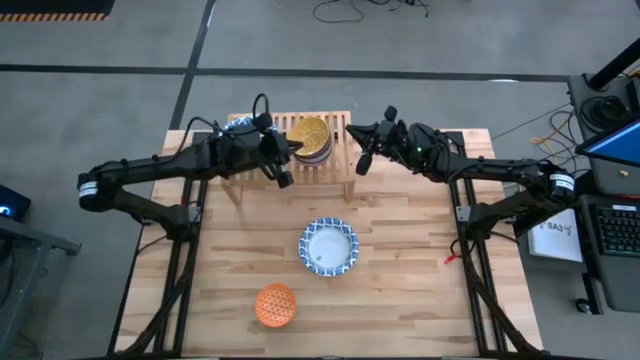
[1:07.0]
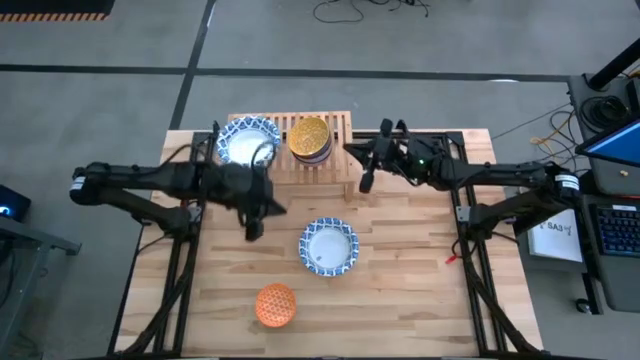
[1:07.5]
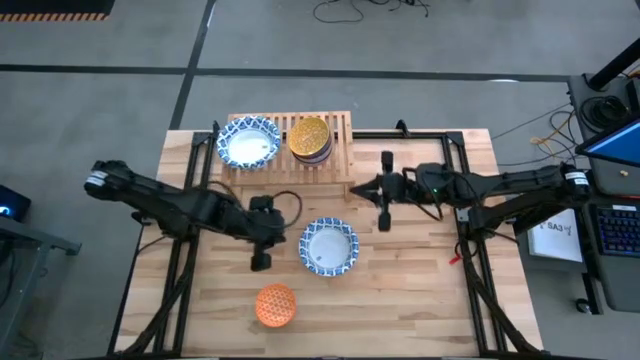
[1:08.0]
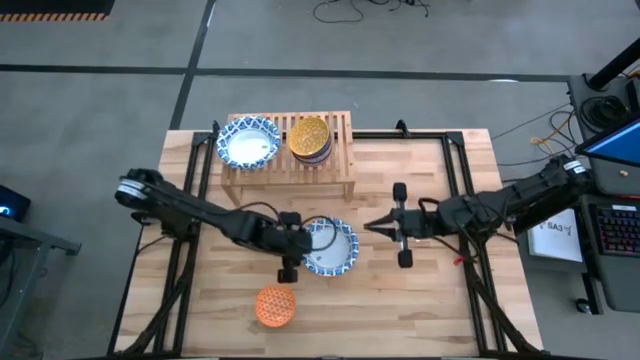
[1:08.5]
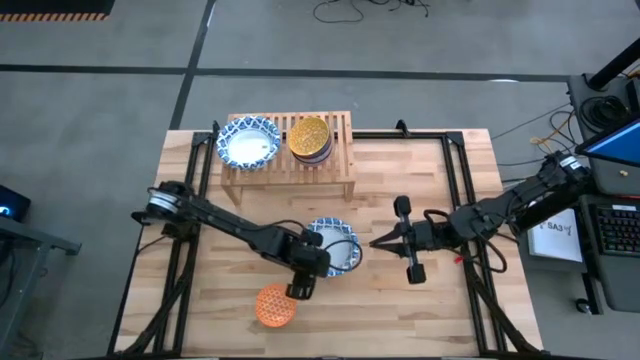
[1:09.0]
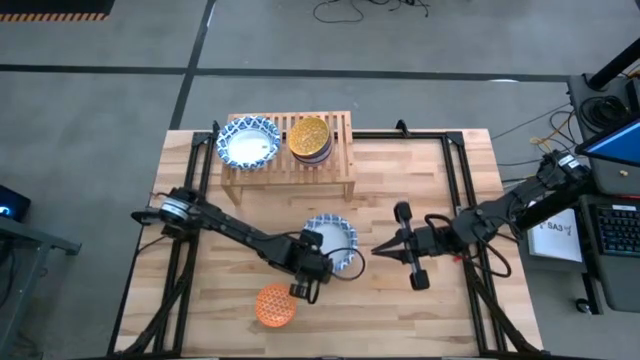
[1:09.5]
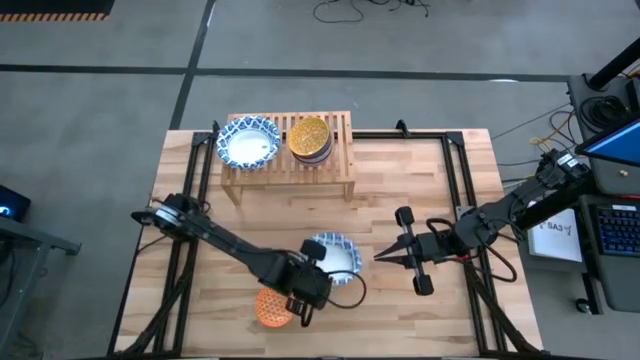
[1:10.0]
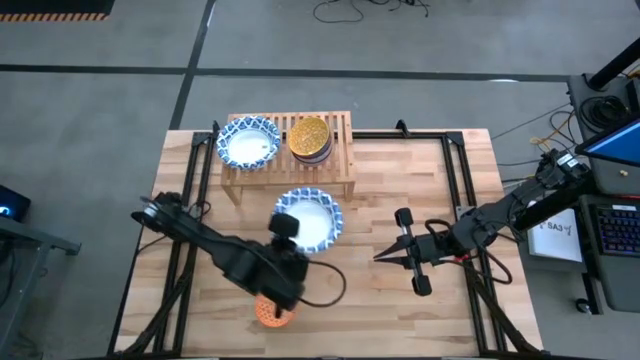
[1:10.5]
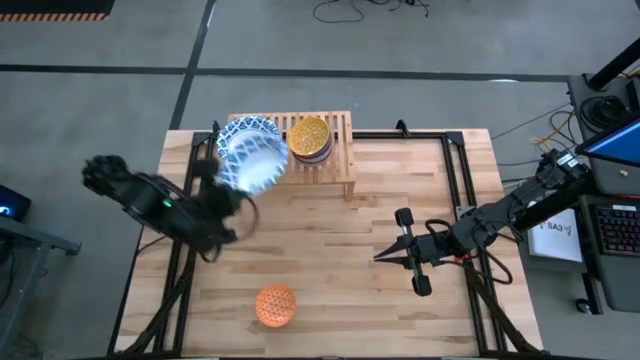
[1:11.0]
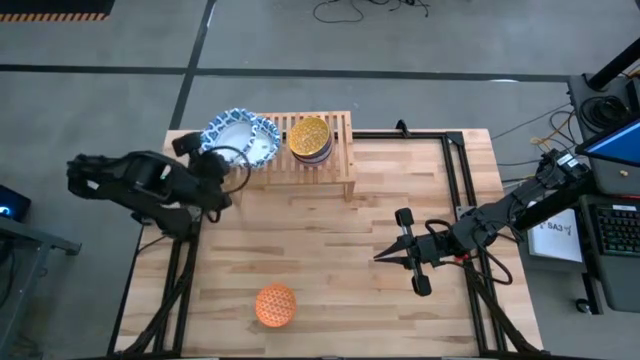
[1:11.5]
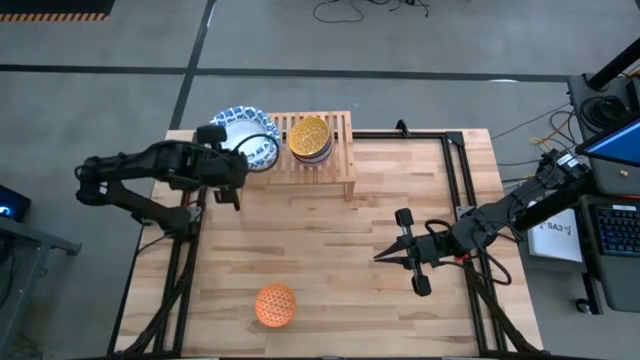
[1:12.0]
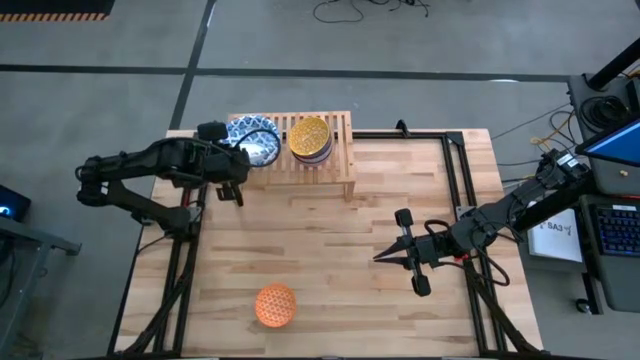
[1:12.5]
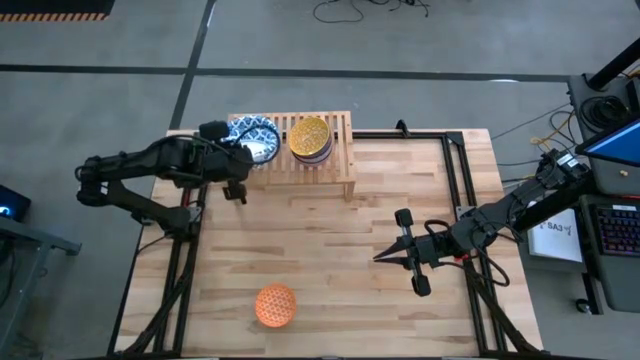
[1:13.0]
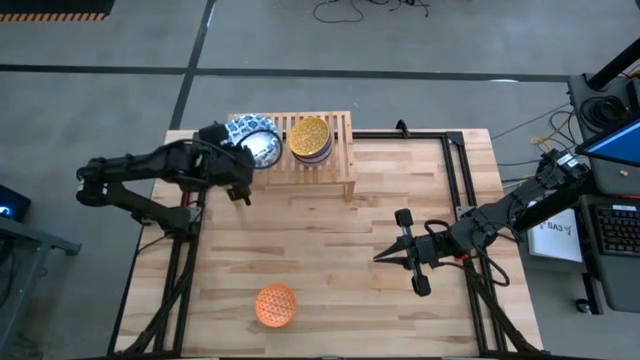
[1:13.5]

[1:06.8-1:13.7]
Task: Place and stack bowls onto a shelf
Stack the white pattern bowl on top of the other white pattern bowl on the shelf

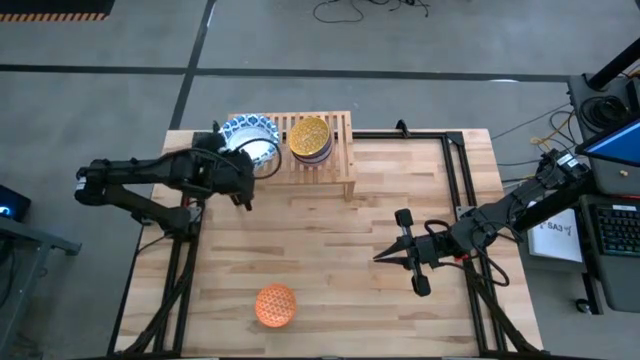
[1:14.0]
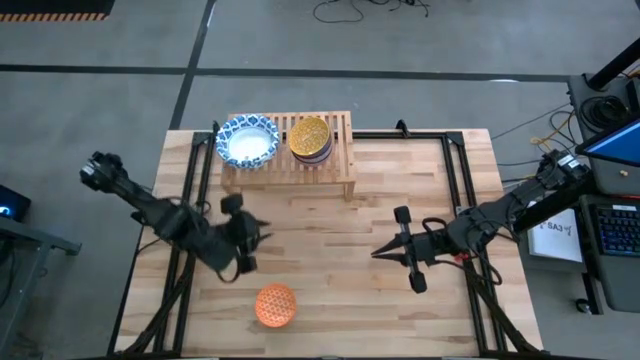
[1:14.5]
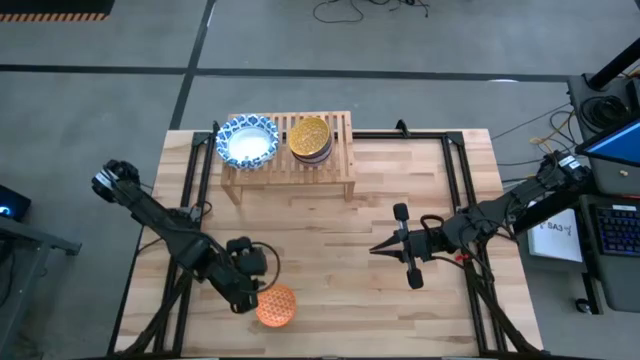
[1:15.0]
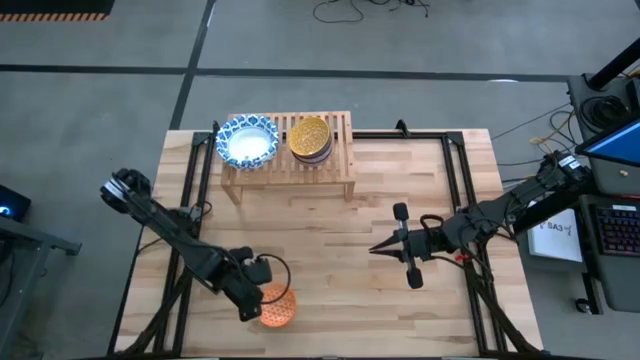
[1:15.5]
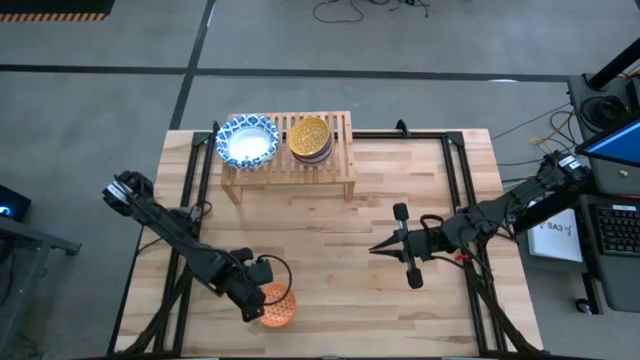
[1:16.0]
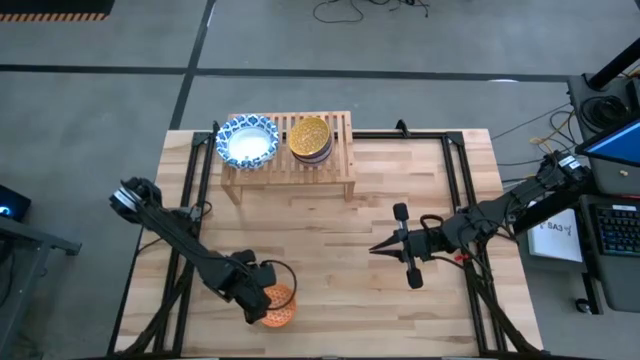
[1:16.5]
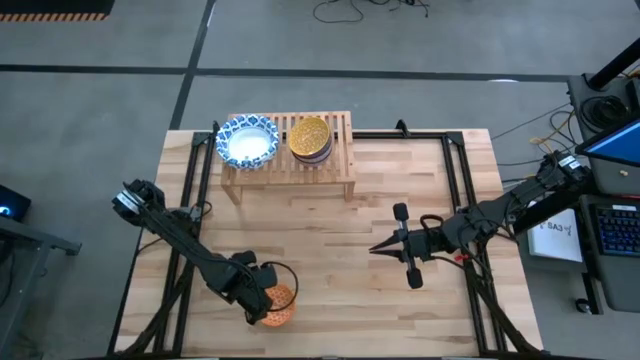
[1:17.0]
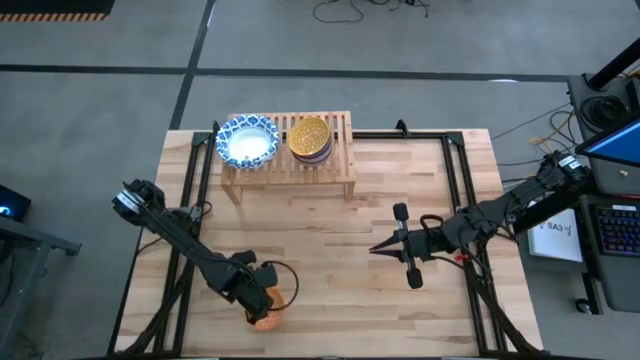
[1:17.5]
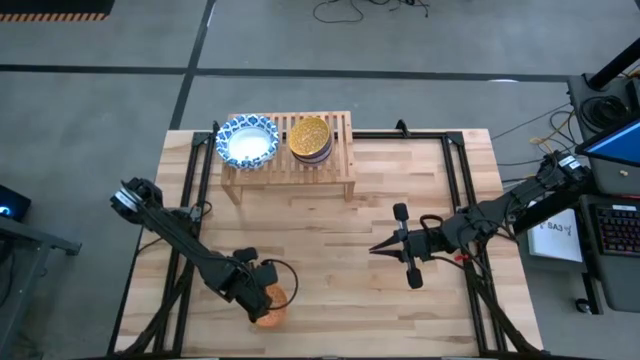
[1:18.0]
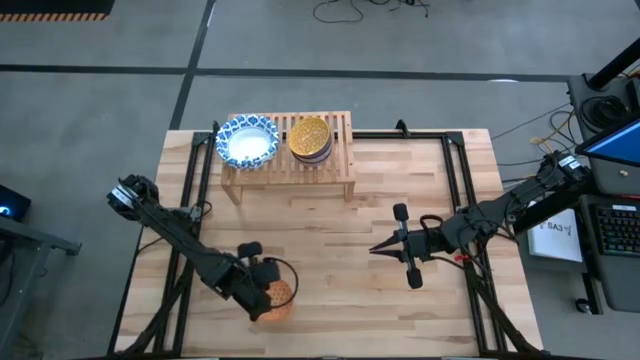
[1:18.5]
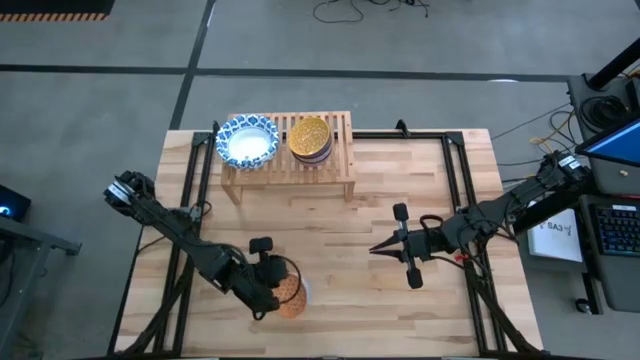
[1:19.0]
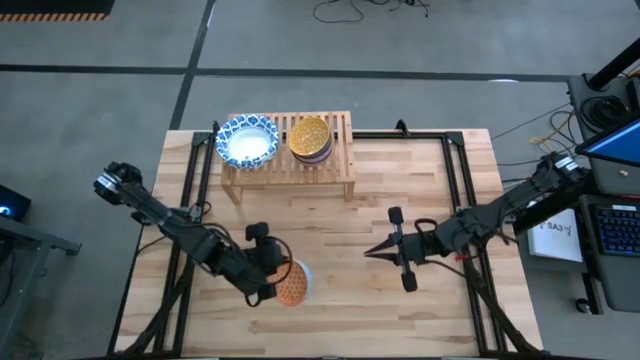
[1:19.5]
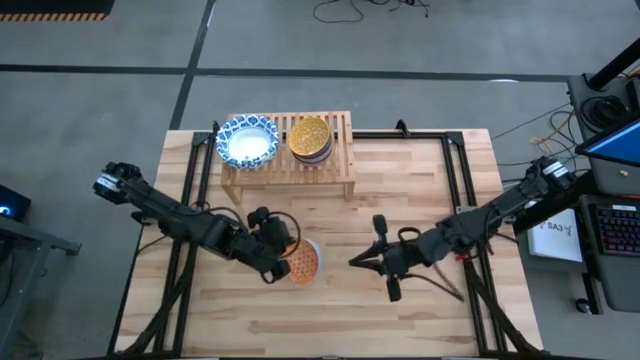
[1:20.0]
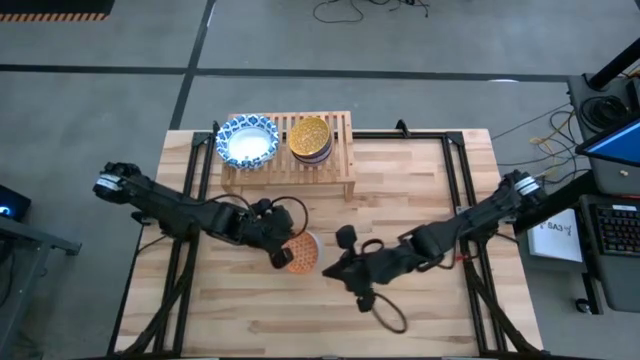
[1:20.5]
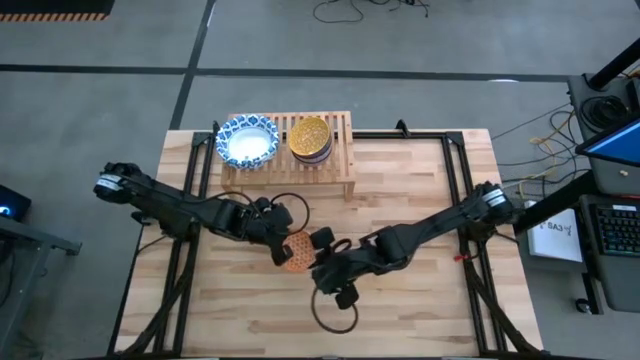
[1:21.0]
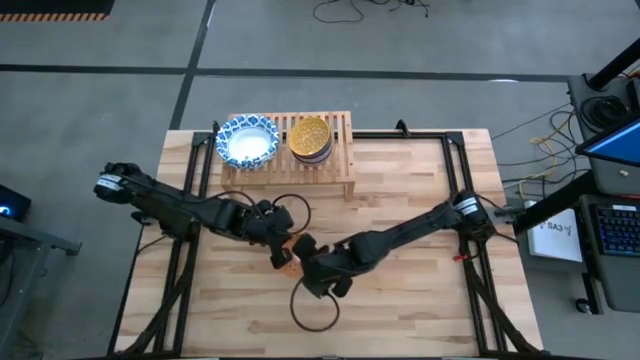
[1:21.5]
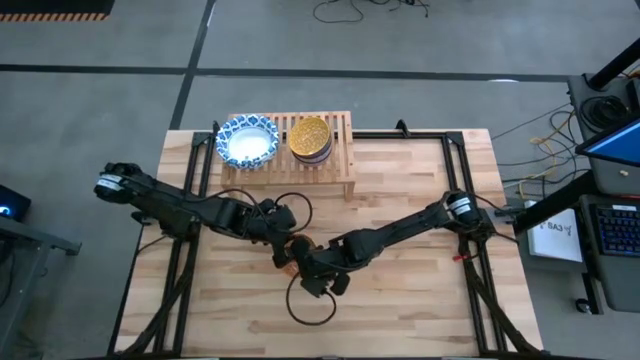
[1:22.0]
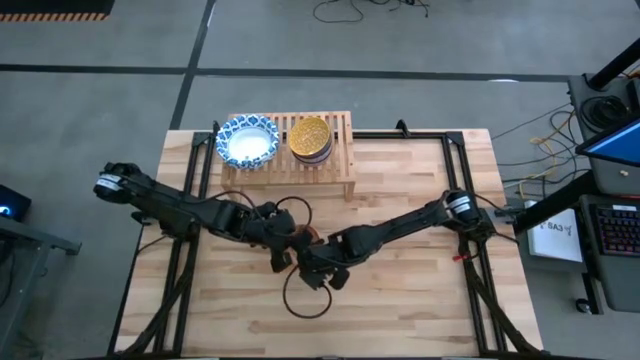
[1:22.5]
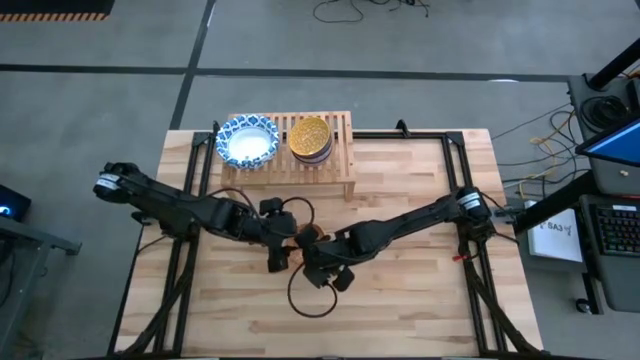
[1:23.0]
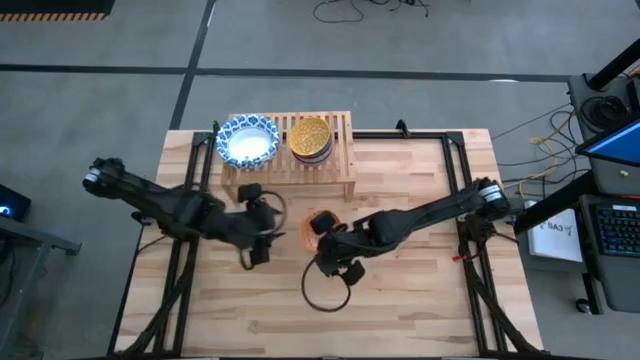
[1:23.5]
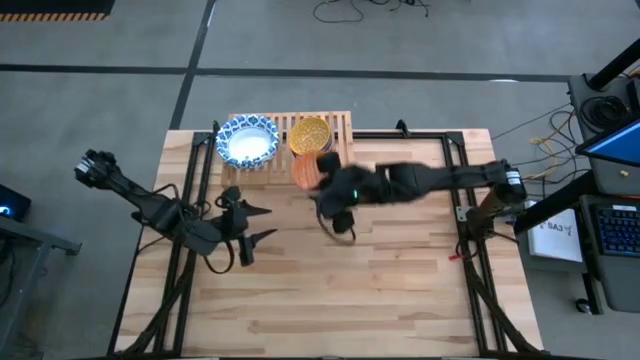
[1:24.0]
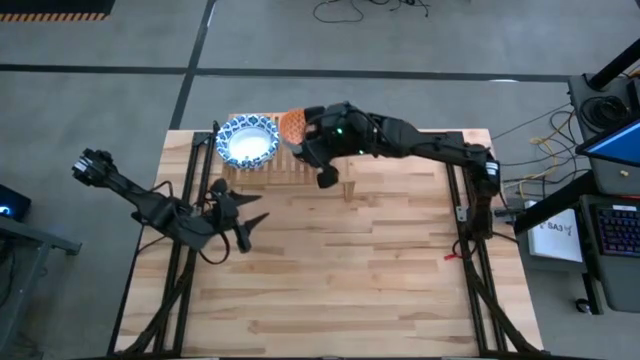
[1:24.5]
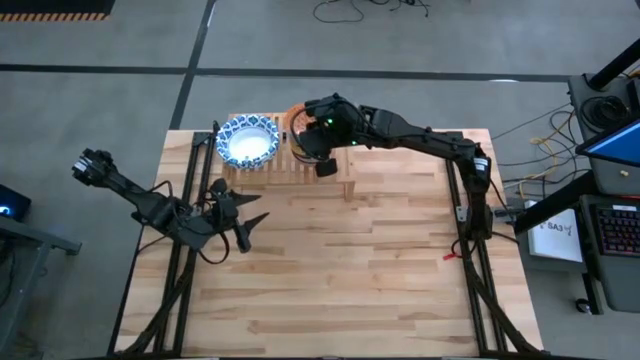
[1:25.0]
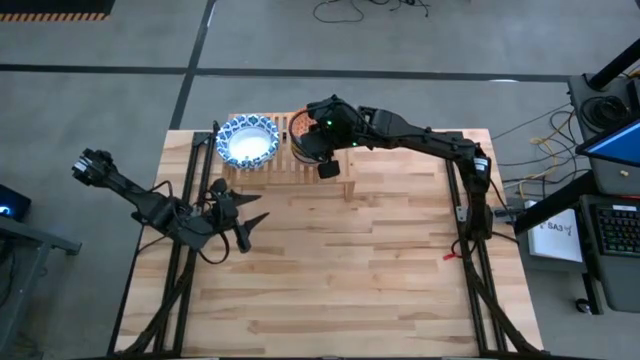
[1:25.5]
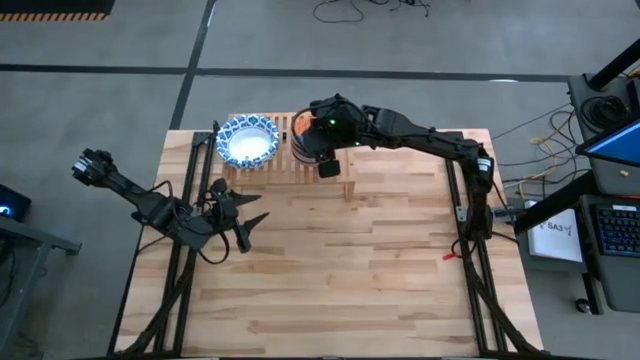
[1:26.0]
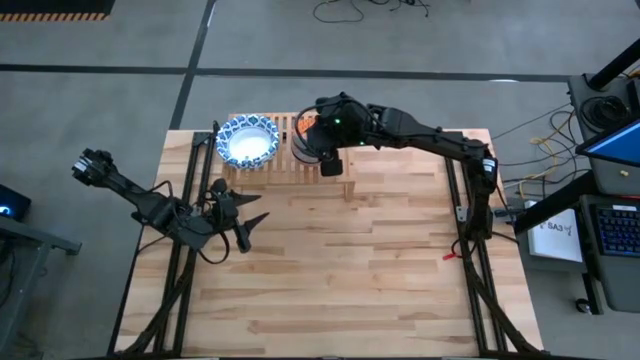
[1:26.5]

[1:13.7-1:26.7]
Stack the orange pattern bowl on top of the yellow pattern bowl on the shelf

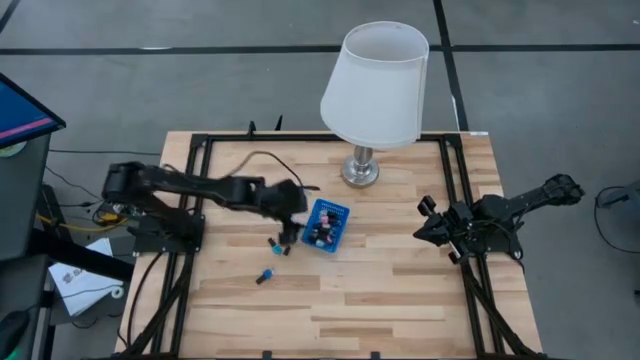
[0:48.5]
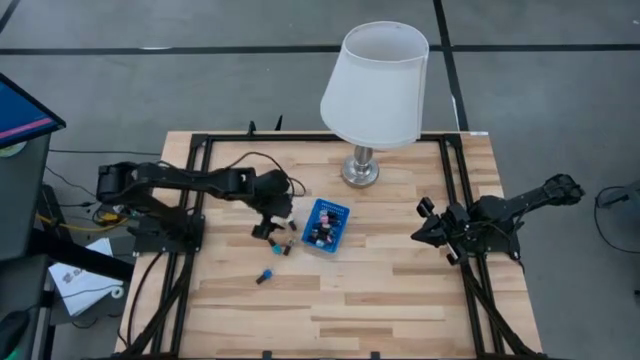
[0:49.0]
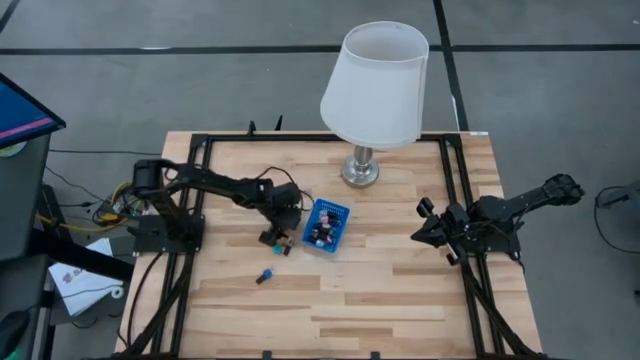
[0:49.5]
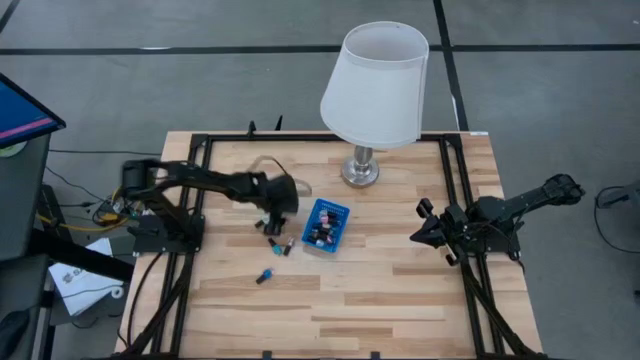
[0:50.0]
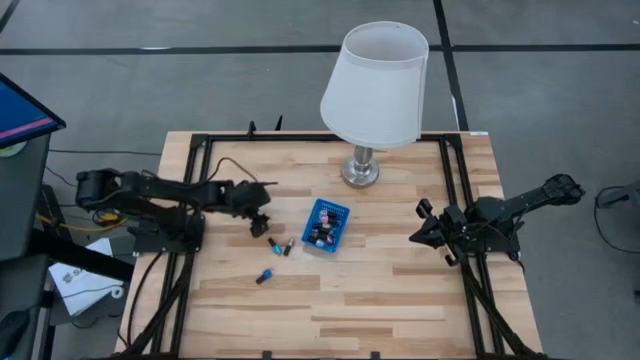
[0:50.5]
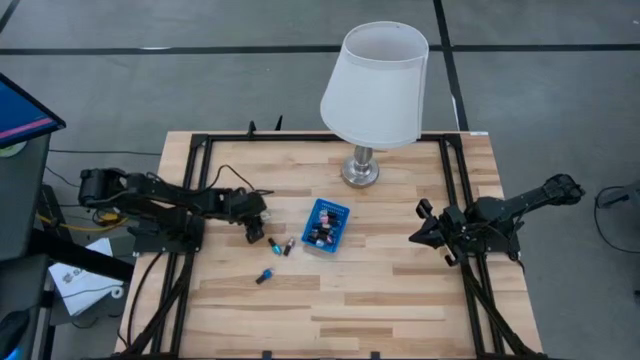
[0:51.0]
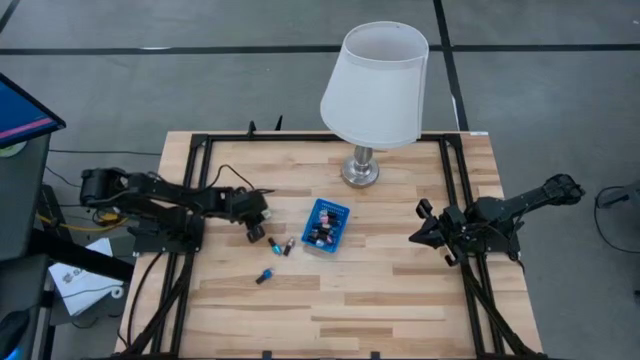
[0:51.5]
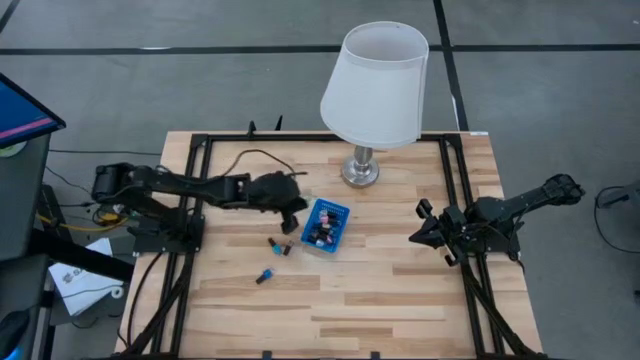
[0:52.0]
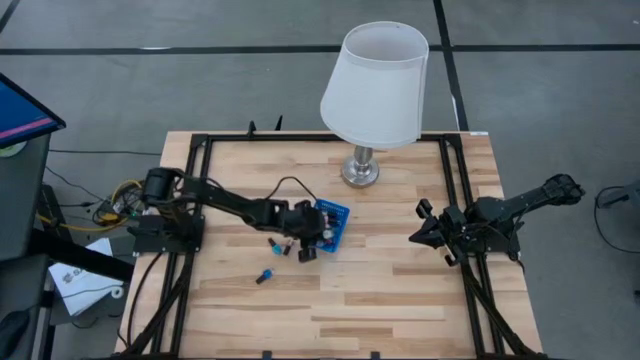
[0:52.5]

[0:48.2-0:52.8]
Task: Pick & Place Nail Polish
Put the sky blue nail polish into the blue basket
